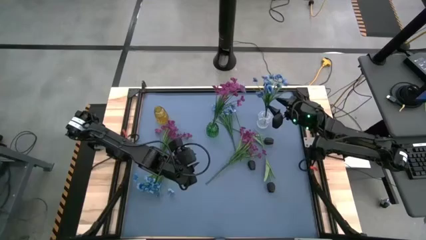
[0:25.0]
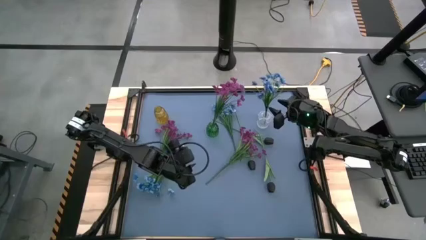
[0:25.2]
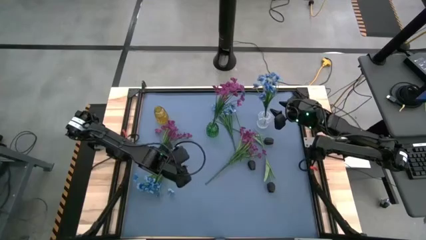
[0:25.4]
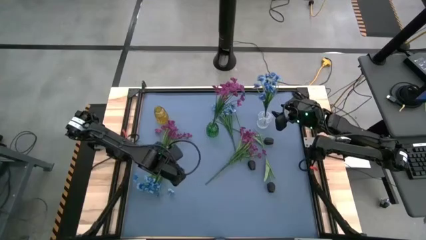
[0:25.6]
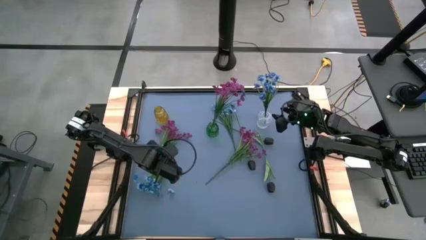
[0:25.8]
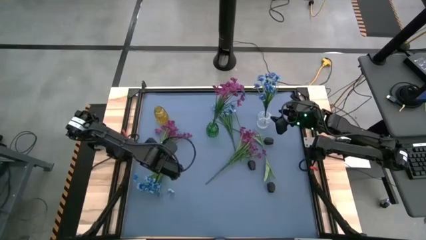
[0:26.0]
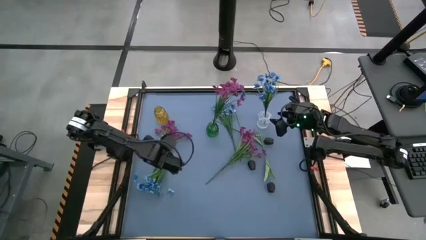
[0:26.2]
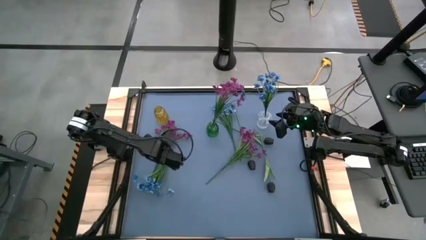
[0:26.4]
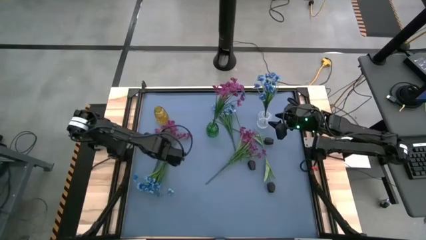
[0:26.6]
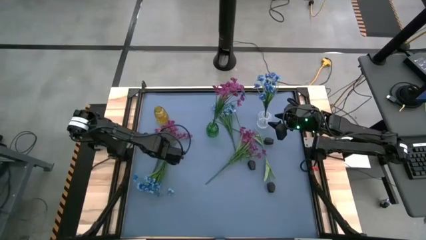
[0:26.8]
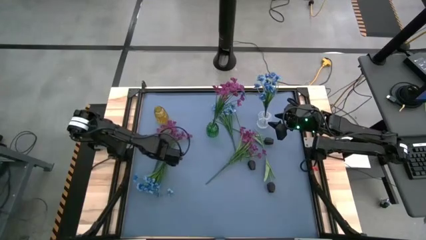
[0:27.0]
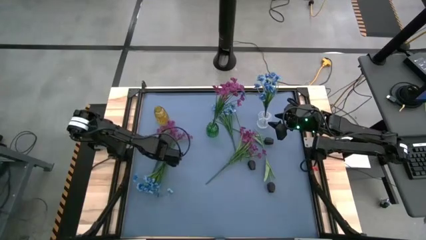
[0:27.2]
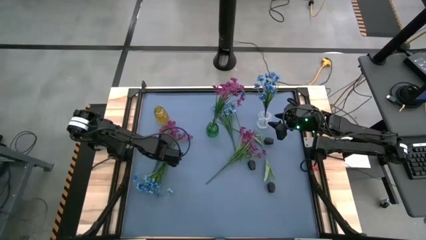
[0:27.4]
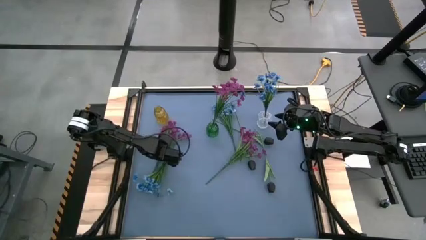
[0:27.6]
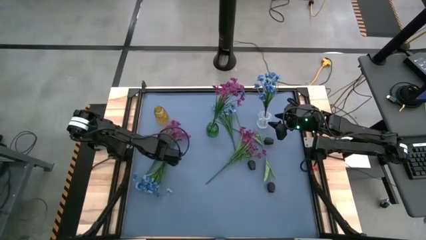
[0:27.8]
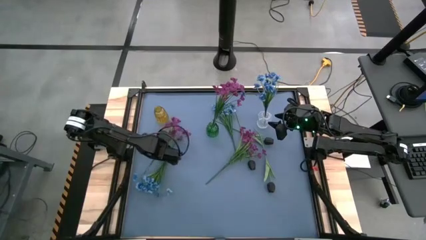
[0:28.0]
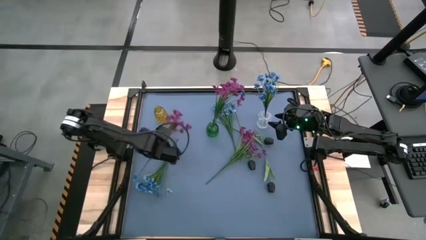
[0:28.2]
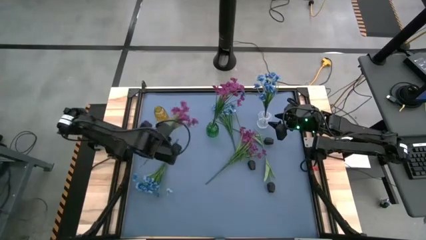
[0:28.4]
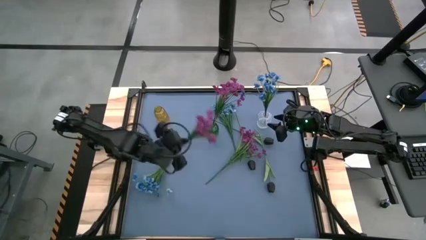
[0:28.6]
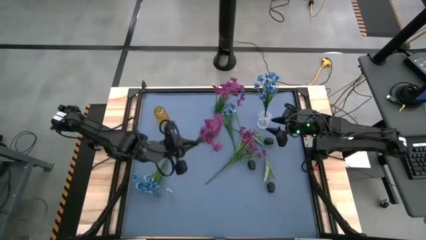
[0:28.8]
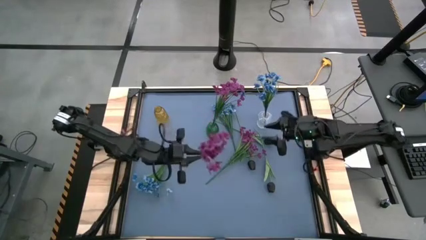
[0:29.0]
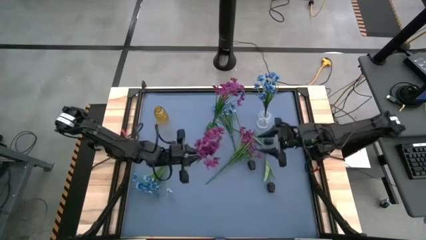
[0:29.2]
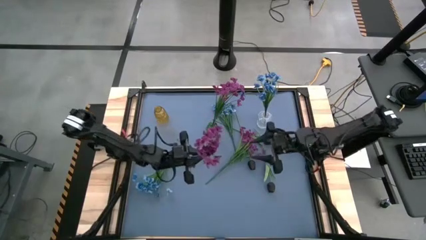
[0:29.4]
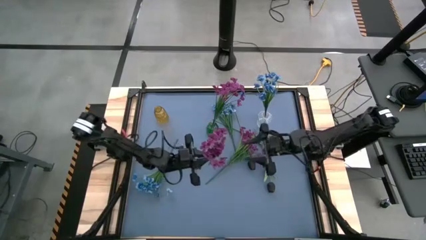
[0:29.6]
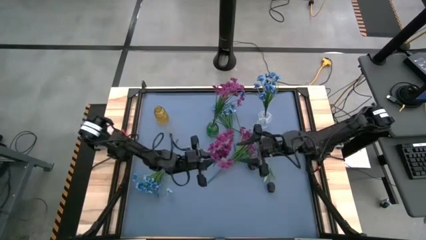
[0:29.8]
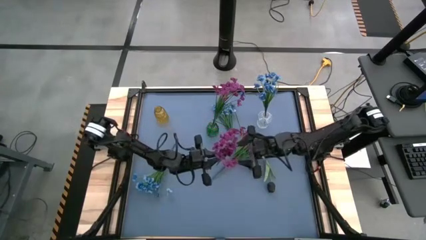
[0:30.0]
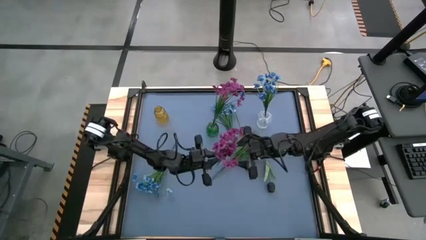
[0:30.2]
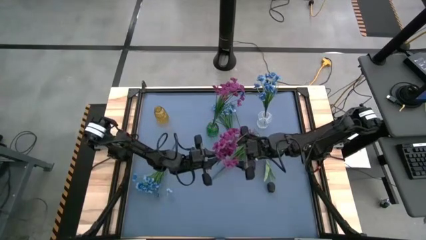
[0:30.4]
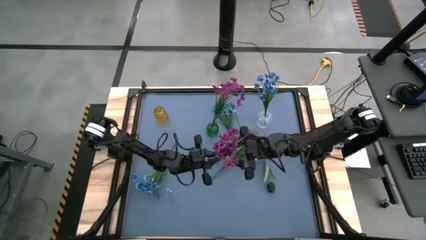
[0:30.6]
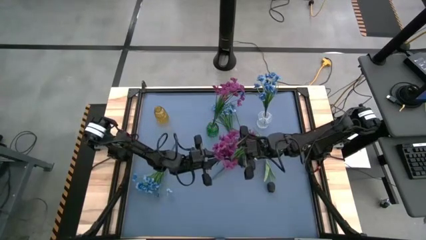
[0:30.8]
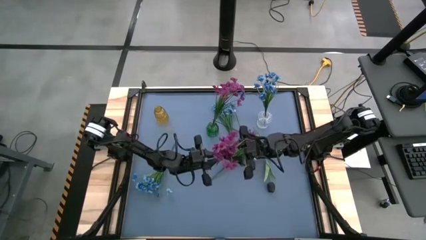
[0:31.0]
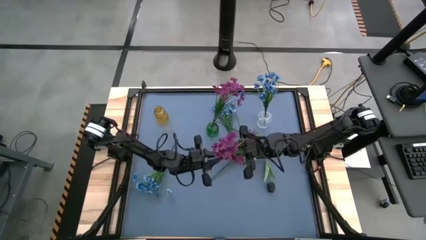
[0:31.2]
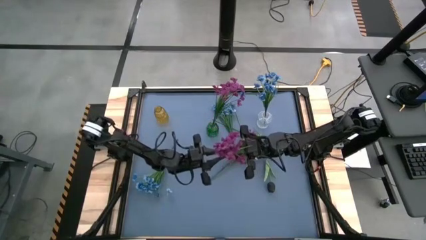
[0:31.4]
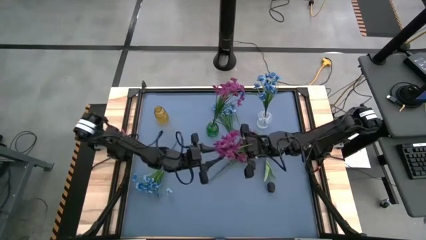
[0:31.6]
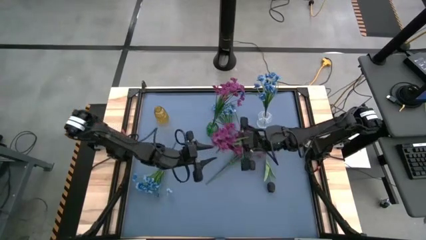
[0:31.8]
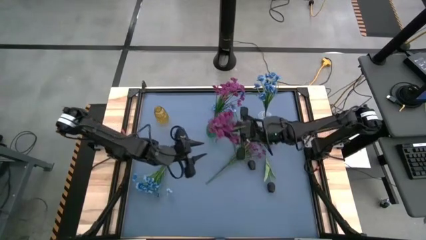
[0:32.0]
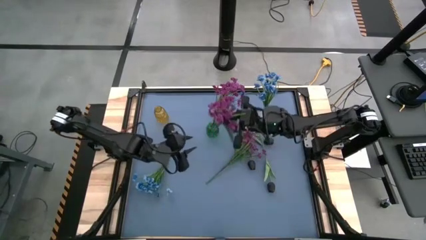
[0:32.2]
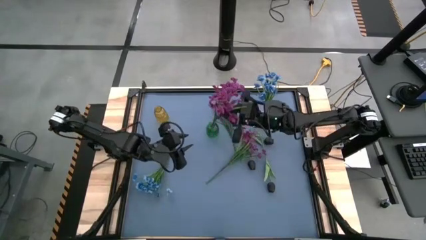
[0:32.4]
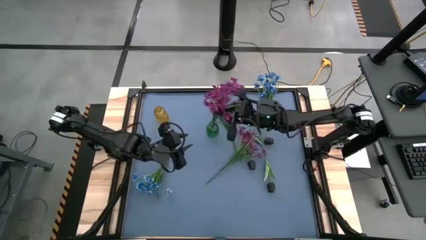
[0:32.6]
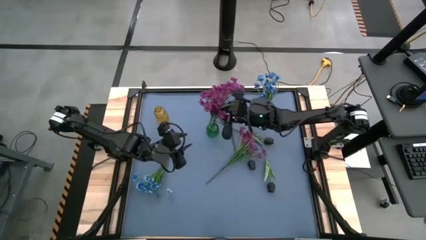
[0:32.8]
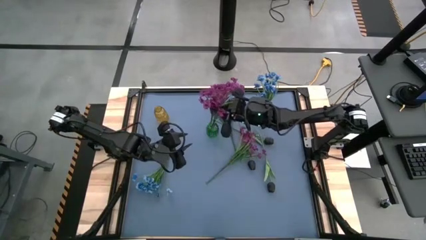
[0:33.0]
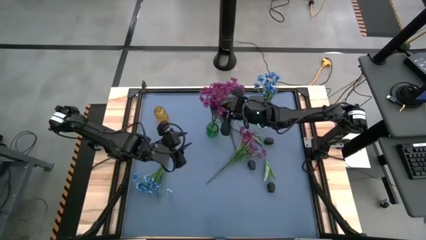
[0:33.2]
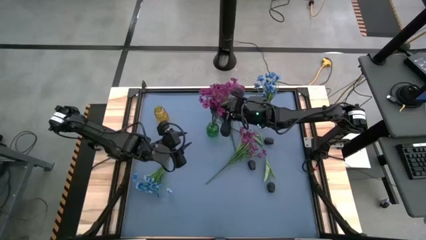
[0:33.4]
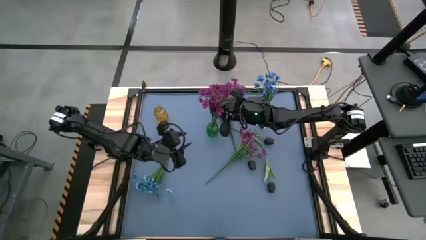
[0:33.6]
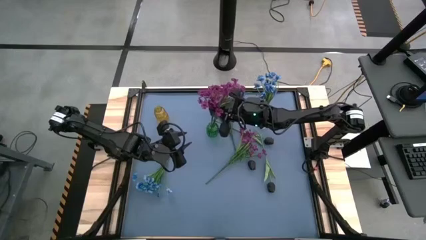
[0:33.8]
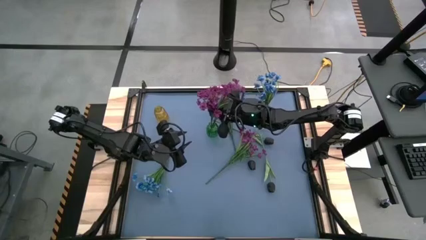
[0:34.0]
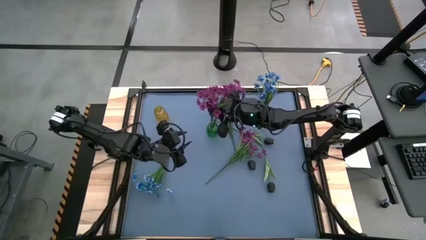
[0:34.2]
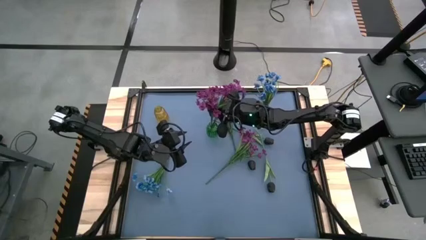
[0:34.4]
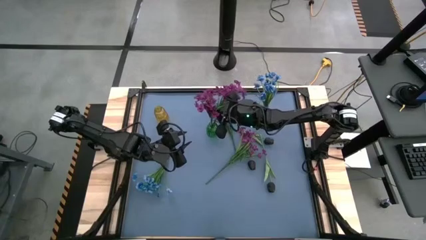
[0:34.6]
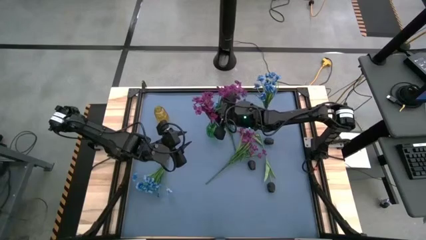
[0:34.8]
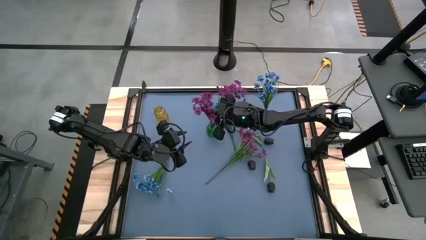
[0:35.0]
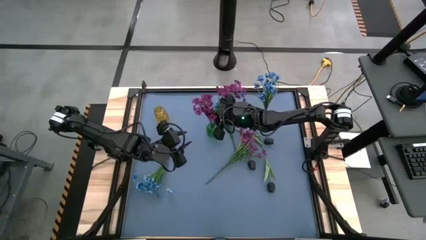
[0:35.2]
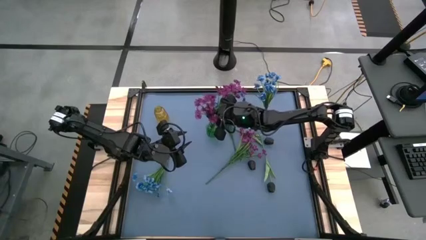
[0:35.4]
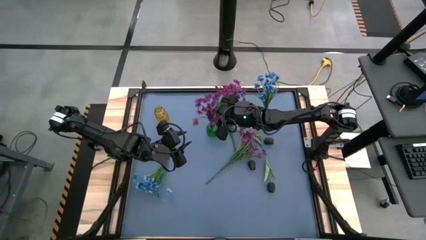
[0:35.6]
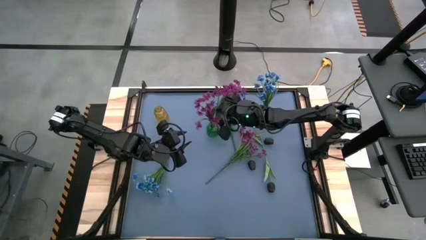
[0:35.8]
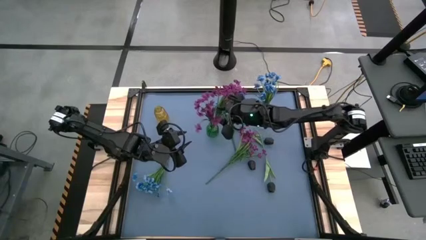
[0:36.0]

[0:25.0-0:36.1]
Task: Sort flowers into vase by color
Put the left purple flowers into the green vase
